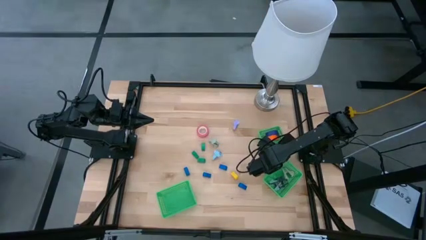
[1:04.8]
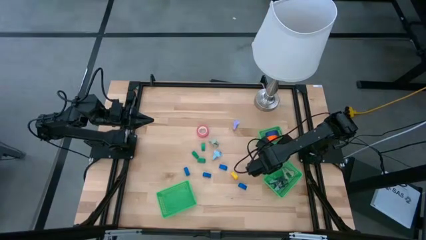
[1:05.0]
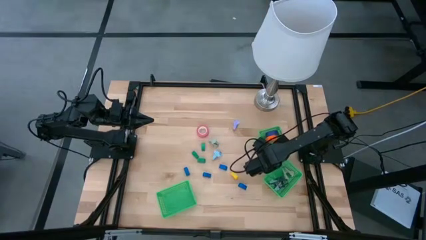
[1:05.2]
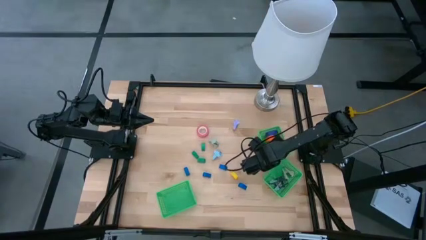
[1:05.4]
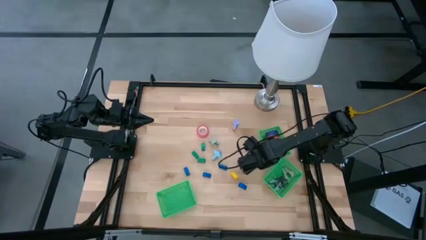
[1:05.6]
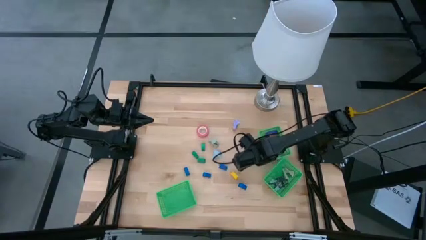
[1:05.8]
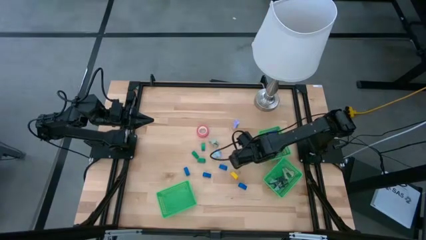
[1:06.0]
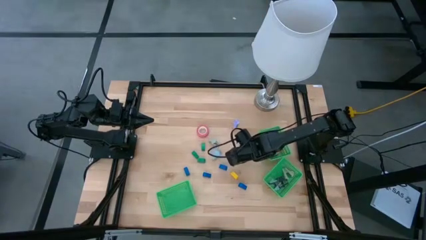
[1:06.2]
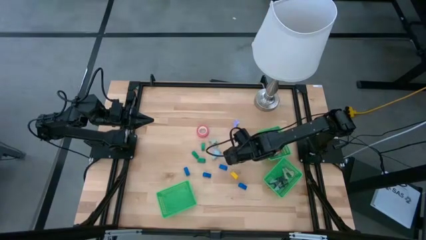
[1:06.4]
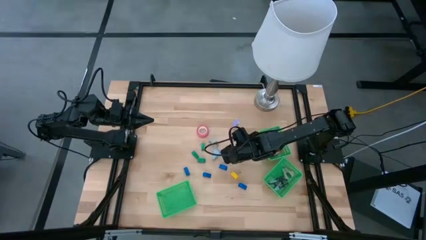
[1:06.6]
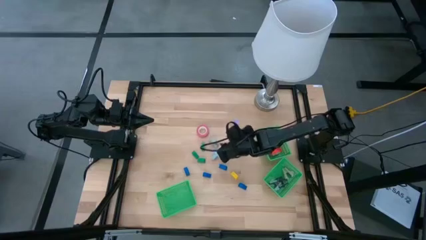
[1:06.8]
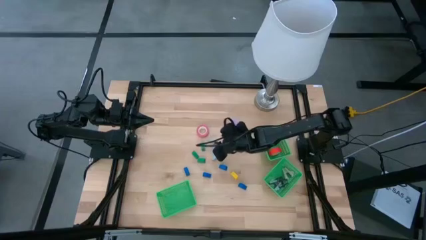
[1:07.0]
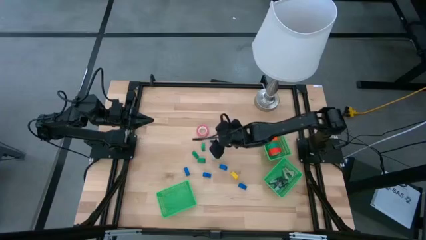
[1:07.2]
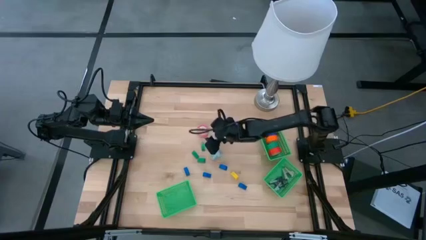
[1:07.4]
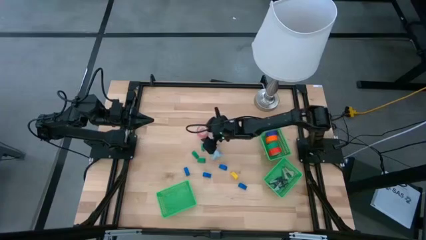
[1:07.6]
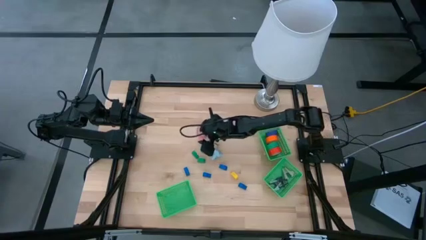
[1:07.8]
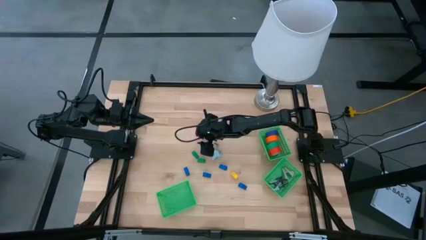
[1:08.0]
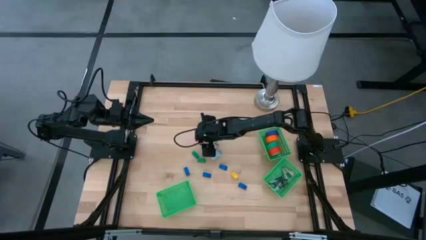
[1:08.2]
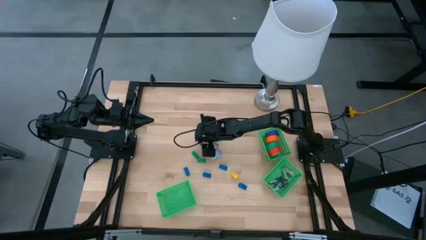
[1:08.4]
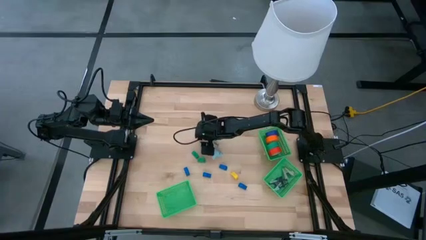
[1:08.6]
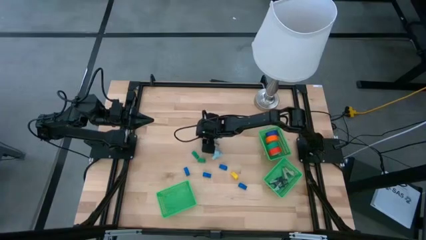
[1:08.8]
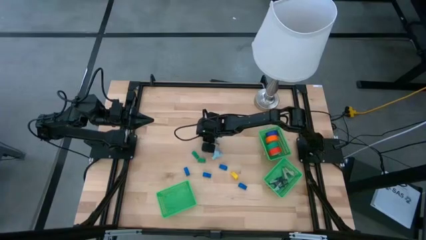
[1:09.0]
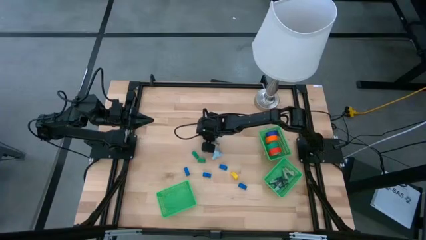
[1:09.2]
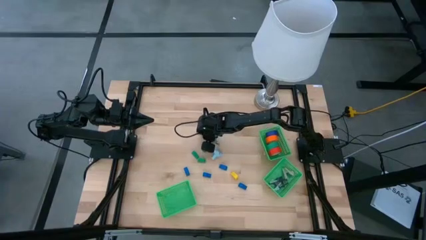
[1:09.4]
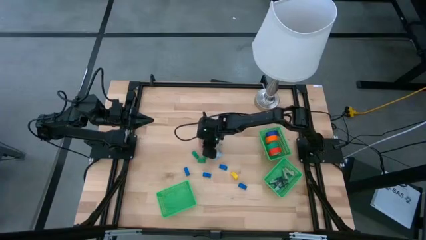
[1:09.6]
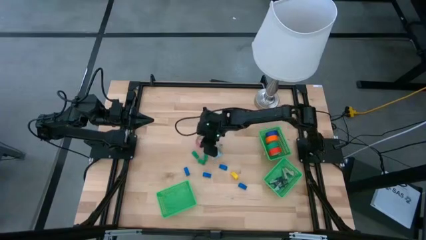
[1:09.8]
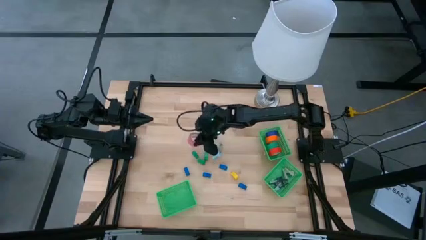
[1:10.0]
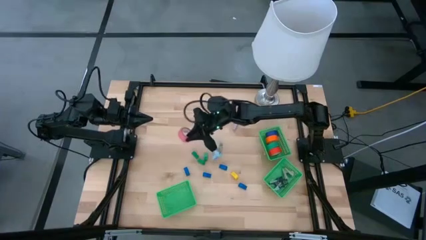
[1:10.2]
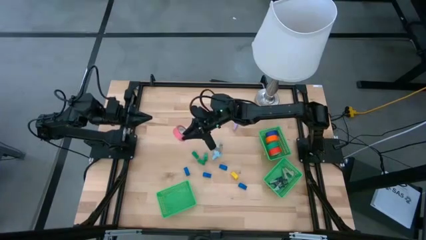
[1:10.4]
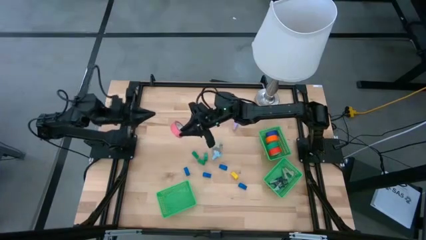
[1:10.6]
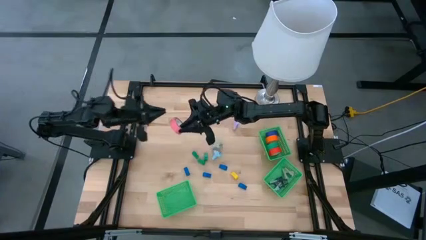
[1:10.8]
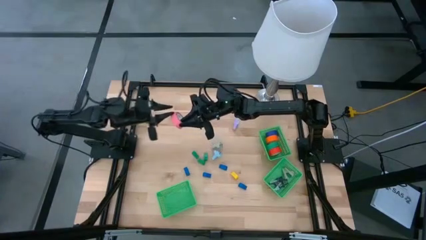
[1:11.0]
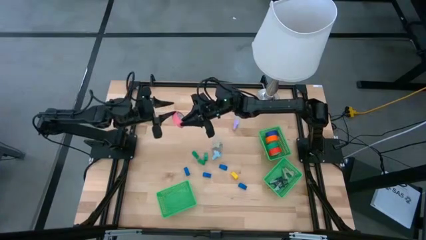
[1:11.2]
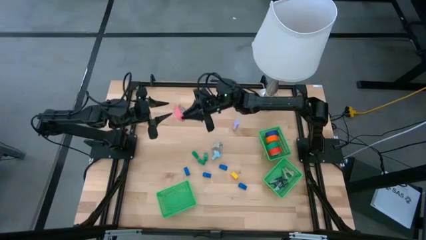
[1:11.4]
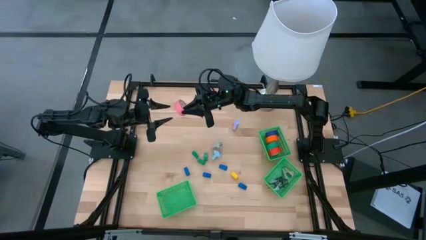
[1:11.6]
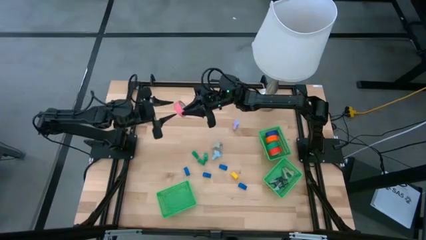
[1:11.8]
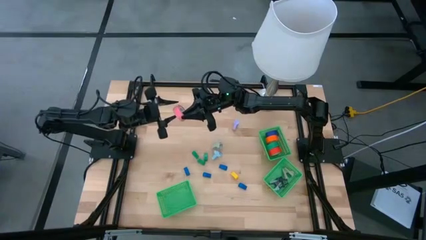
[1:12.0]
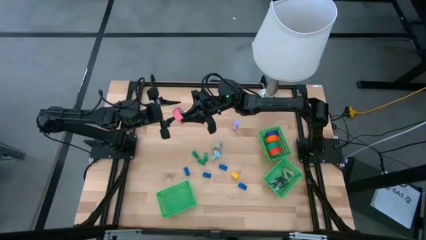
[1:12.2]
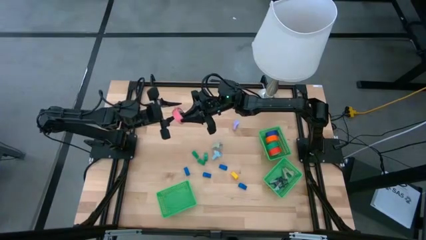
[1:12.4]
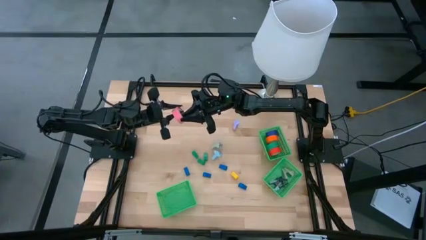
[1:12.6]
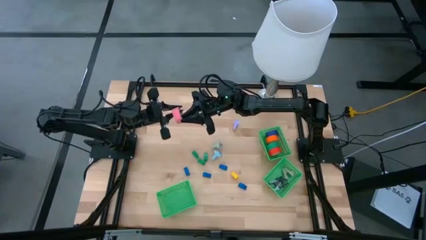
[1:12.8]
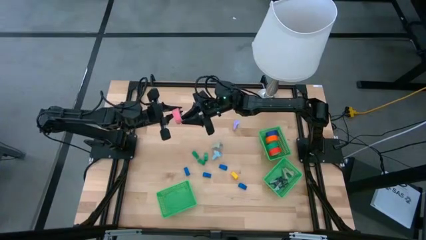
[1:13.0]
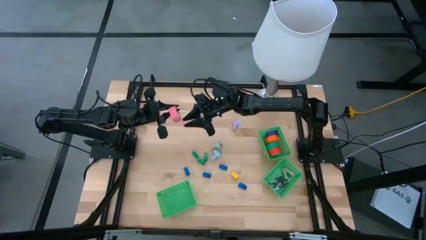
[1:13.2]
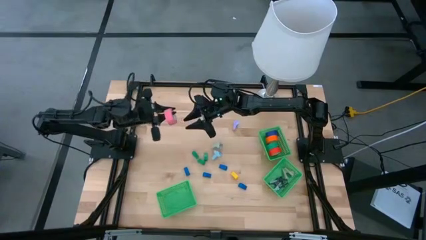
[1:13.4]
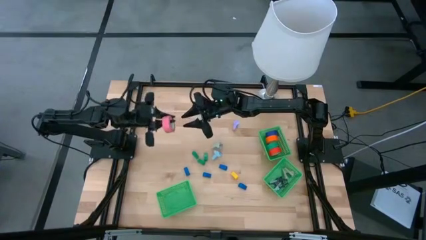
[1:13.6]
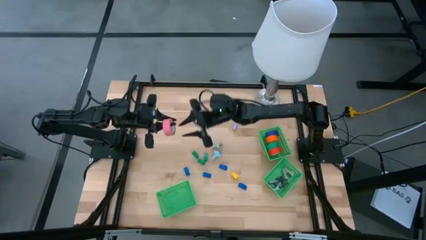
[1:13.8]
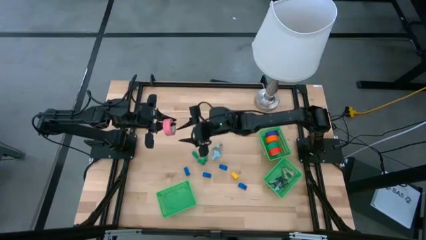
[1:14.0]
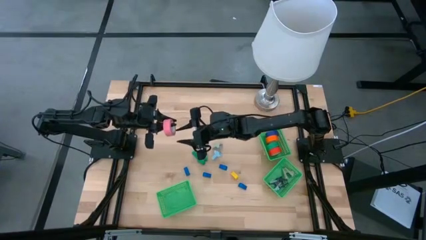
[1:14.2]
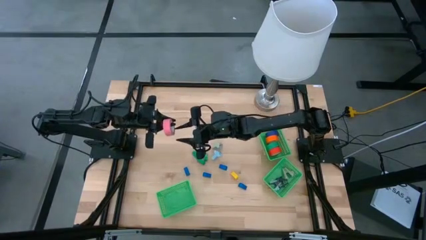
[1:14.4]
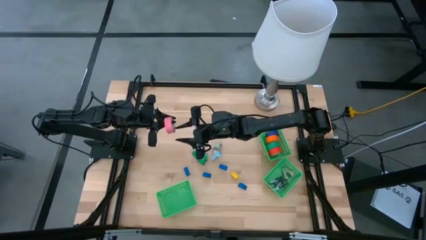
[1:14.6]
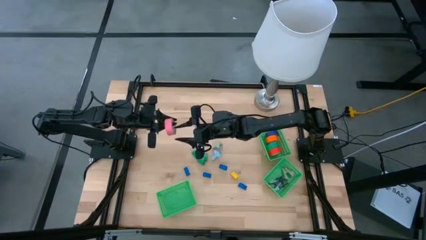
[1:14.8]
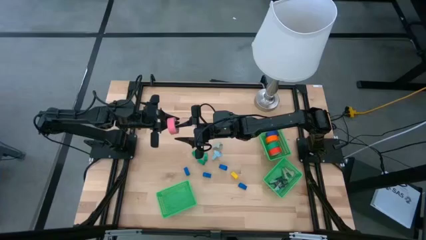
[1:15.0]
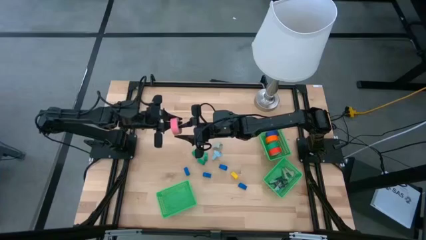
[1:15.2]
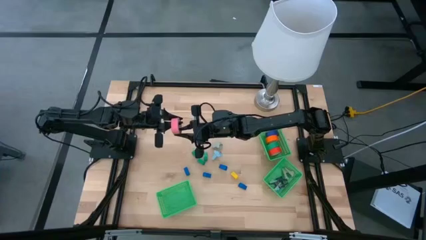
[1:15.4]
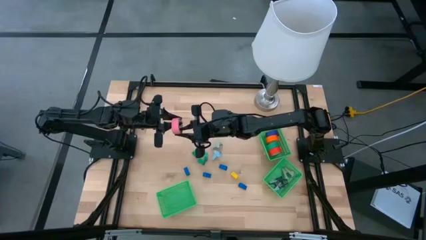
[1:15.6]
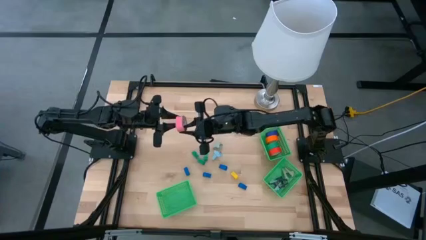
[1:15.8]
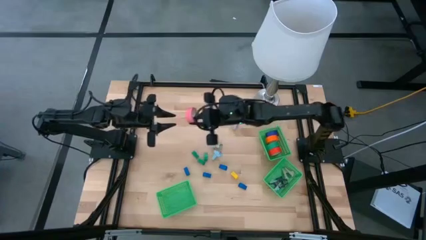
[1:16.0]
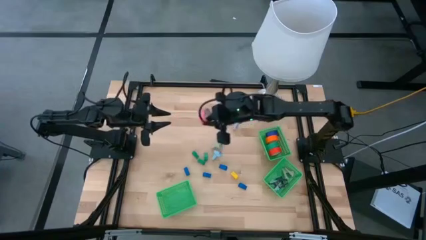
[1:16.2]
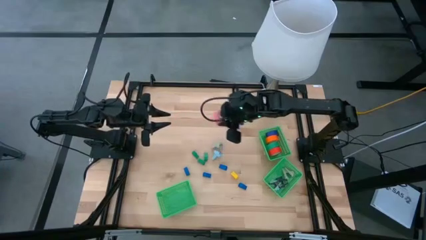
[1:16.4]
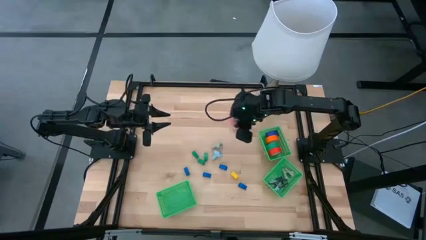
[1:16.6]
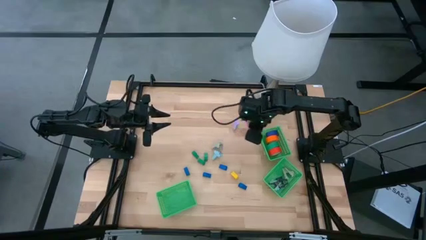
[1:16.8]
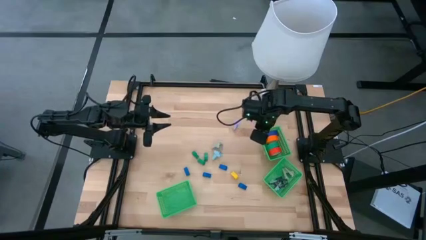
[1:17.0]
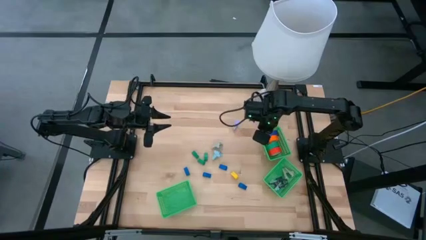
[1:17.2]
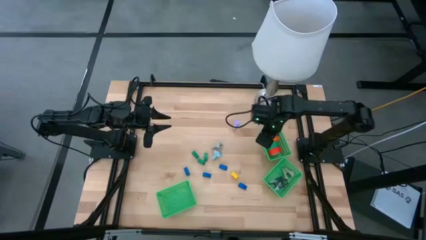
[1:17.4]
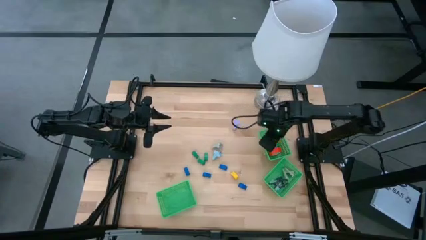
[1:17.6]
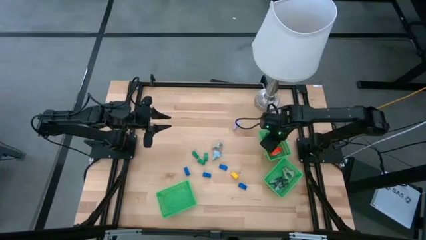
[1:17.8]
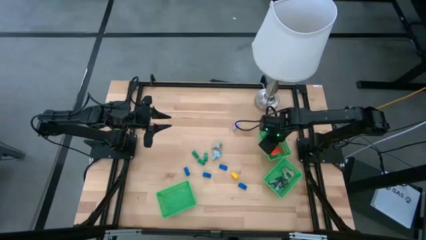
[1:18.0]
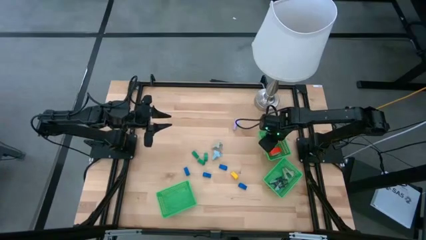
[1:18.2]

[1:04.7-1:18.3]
Task: Pick and place Stapler, Stapler remover, tape
Put the pink tape into the top right green bin

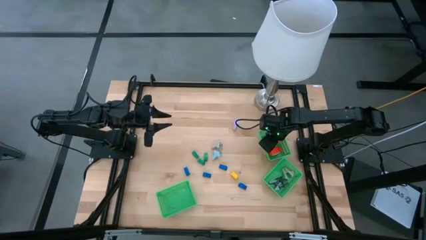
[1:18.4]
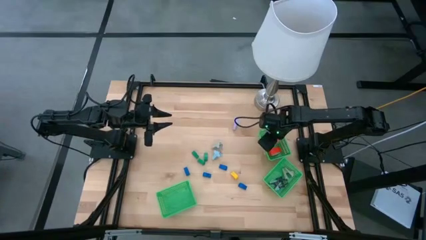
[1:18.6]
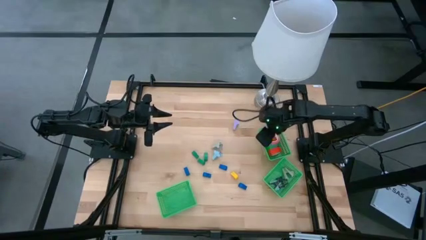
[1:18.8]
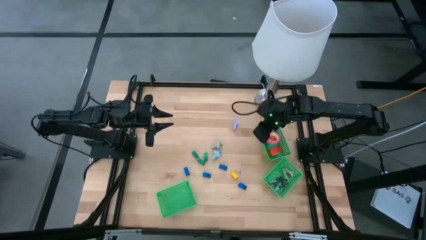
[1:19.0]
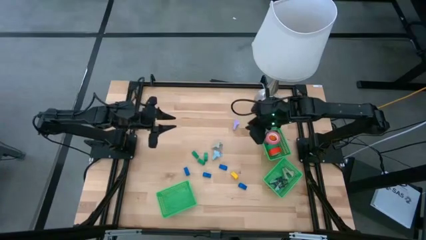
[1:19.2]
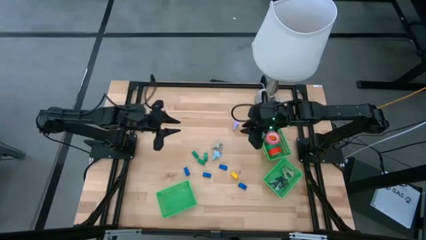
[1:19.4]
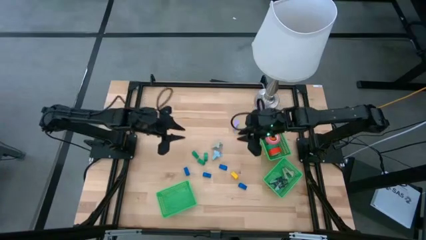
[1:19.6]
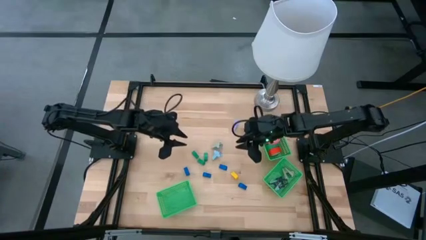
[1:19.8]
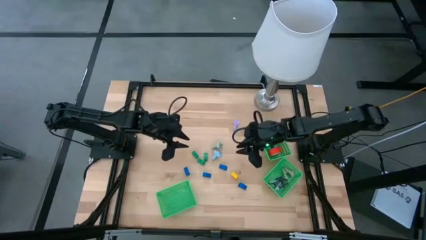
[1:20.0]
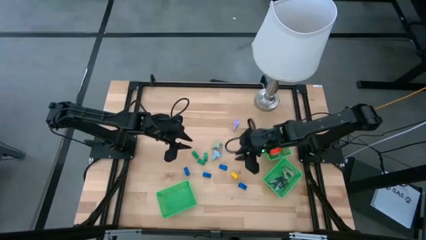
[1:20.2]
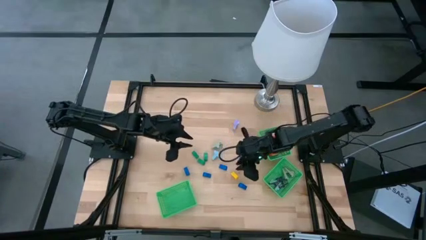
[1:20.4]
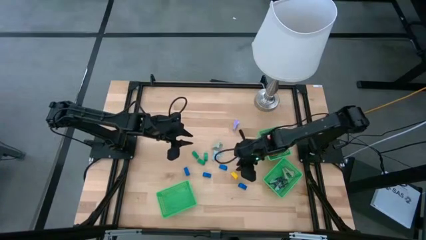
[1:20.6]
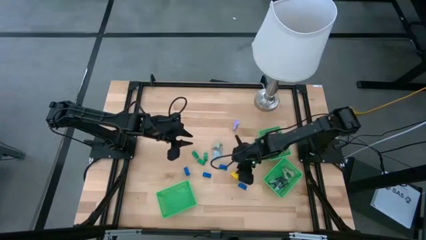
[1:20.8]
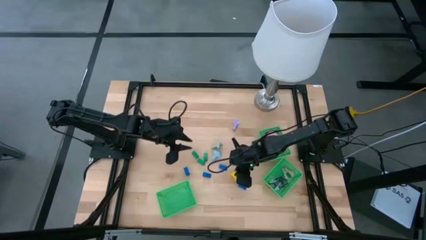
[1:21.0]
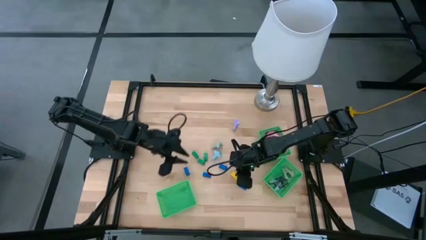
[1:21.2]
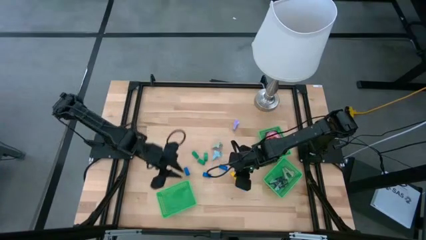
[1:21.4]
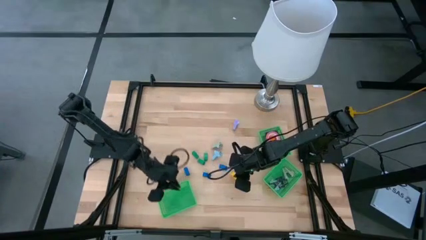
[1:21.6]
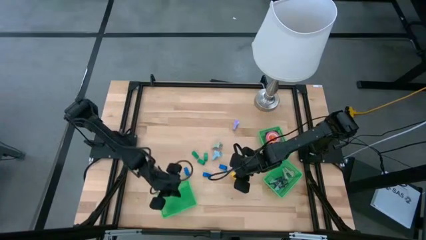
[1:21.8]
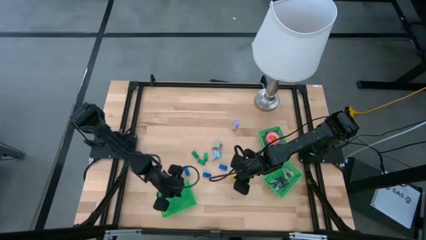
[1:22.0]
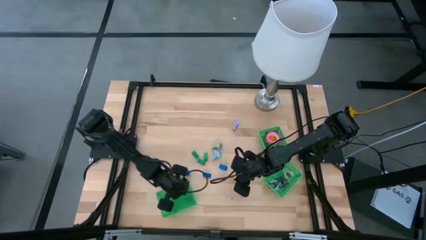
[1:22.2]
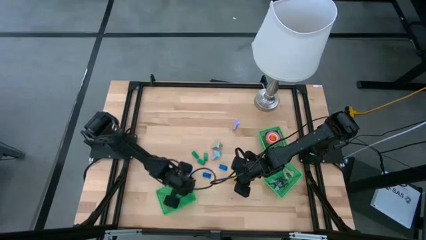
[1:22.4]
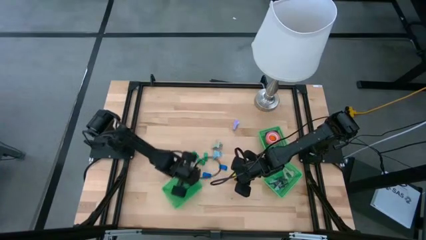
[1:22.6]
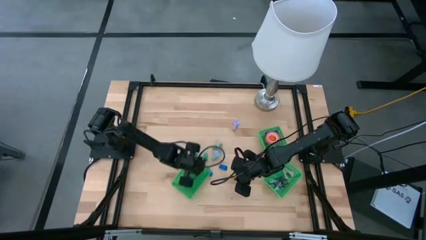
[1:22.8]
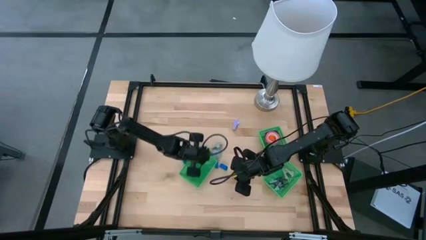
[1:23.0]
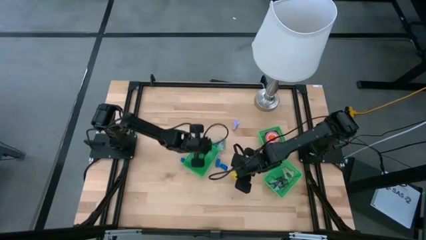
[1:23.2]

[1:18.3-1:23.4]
Move the left green bin to the center of the table
